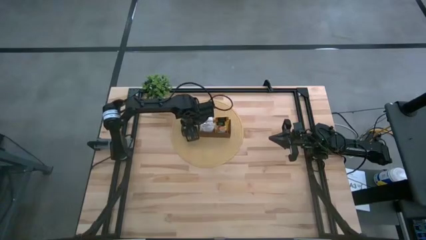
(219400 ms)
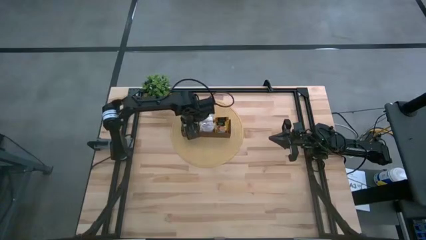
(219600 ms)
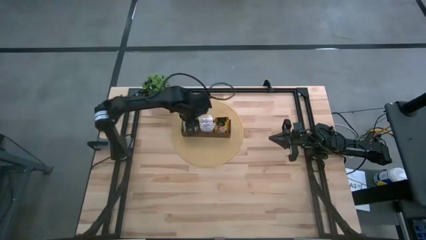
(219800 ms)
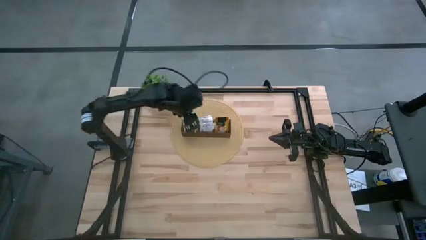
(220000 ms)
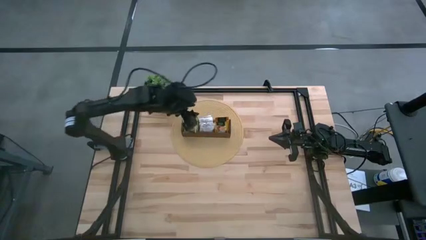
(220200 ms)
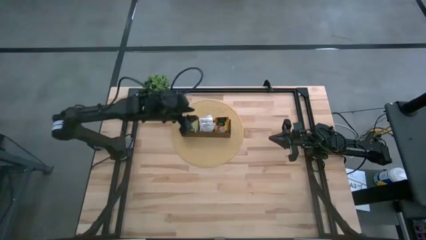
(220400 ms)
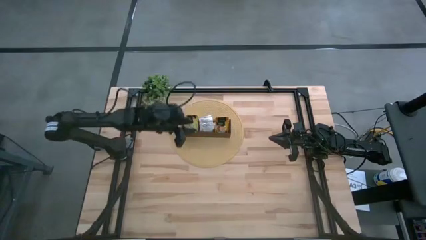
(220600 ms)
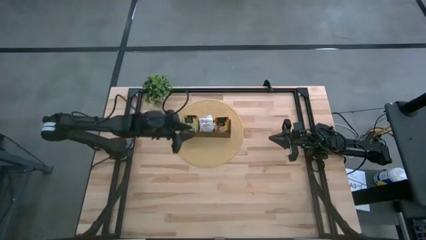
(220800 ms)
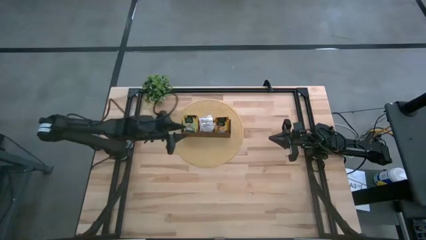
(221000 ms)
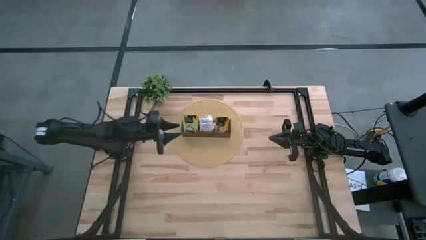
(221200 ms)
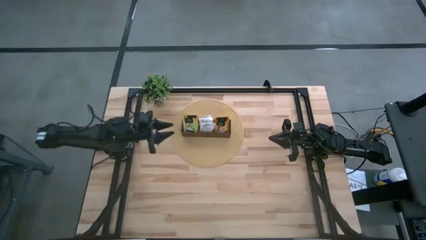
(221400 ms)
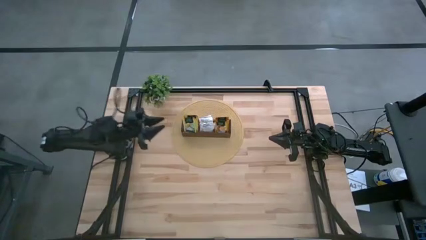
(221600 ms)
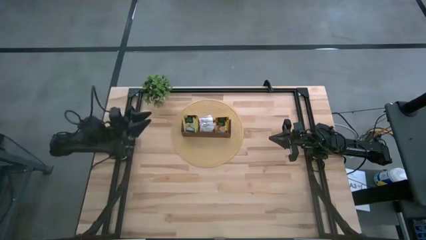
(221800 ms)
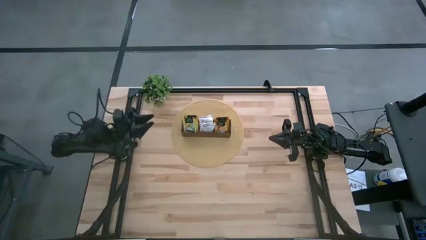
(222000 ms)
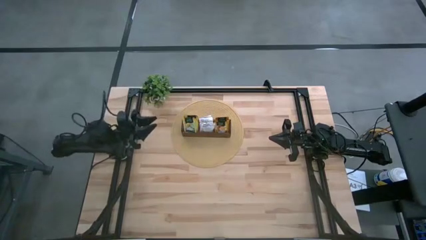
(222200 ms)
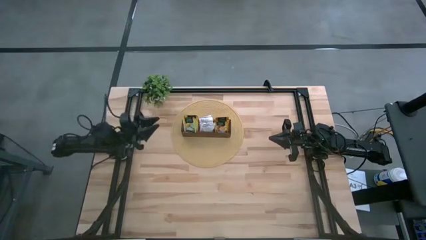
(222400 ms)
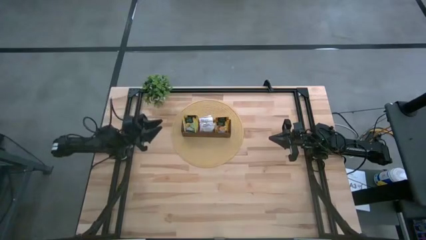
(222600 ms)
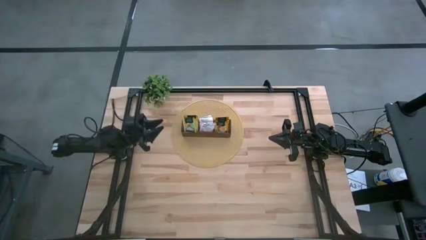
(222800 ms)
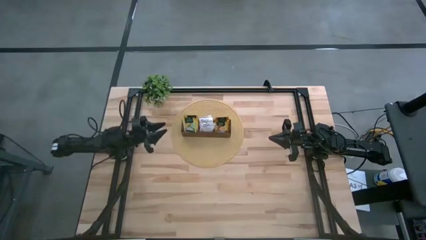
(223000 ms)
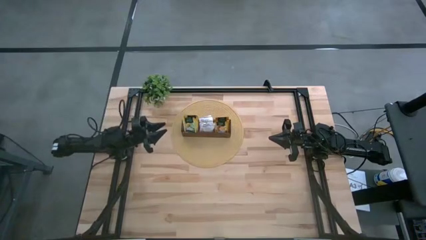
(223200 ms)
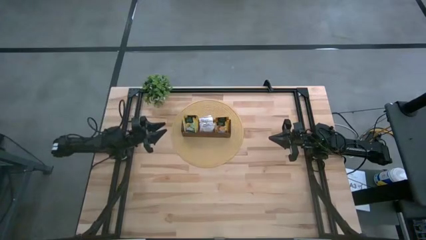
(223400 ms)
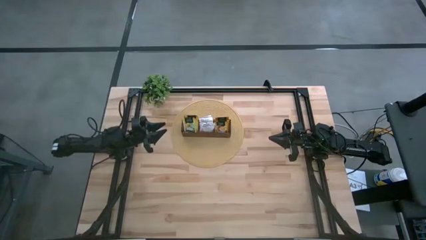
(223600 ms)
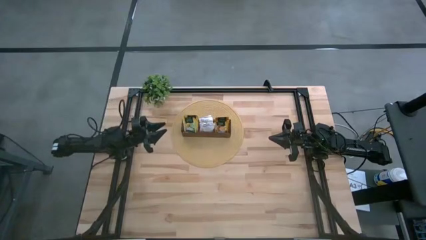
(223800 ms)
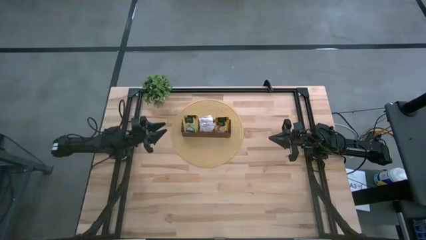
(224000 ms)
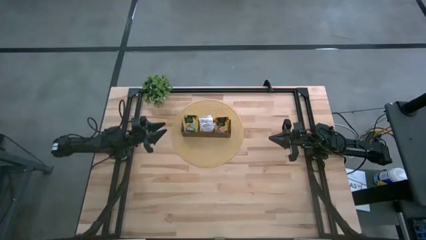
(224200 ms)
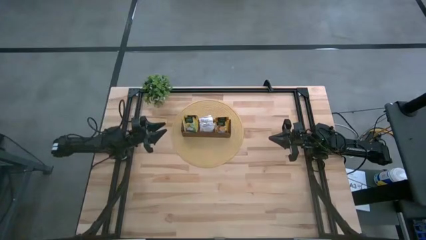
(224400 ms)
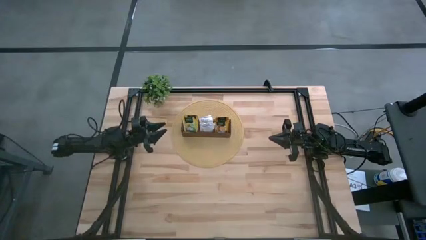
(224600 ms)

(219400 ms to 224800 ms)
Task: Pick & Place Tea
Return to Home Position

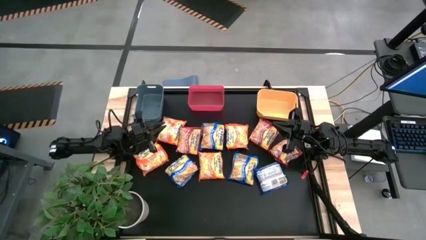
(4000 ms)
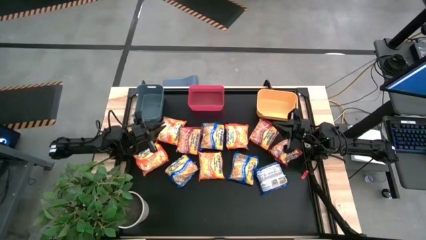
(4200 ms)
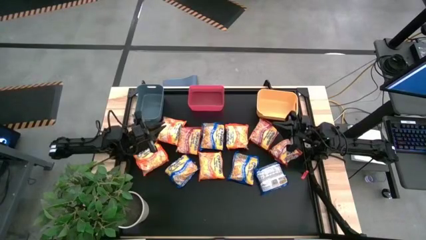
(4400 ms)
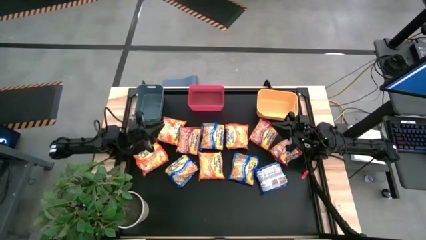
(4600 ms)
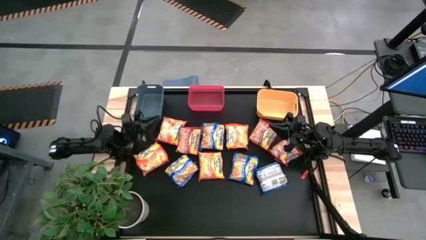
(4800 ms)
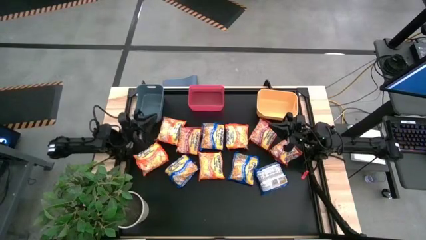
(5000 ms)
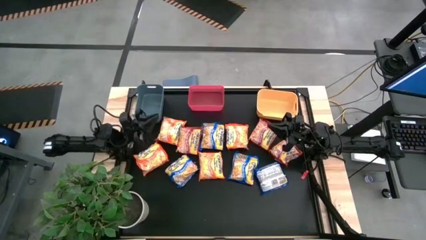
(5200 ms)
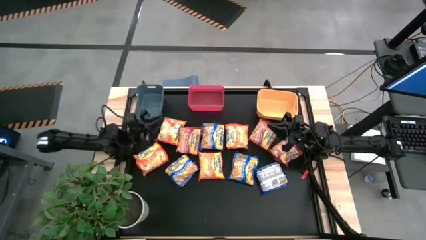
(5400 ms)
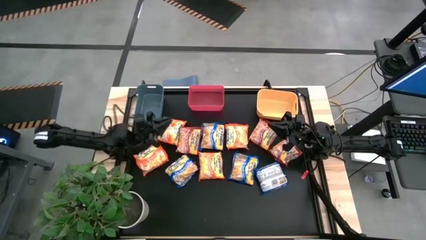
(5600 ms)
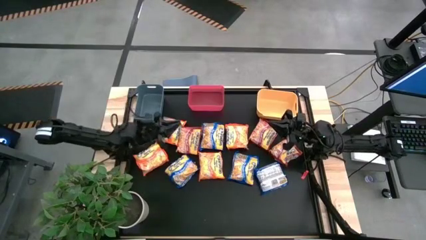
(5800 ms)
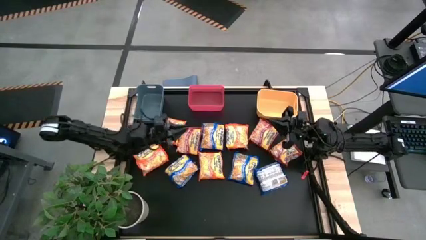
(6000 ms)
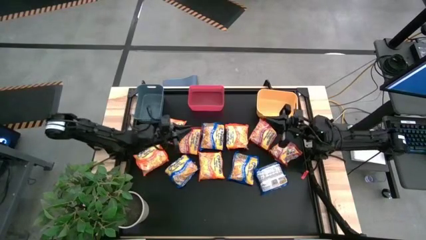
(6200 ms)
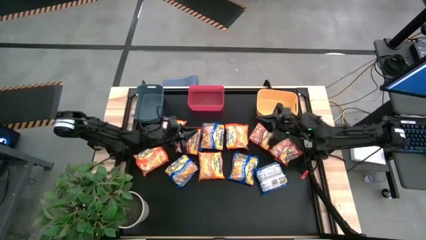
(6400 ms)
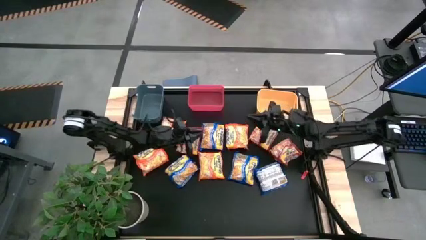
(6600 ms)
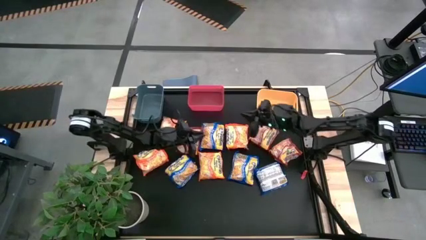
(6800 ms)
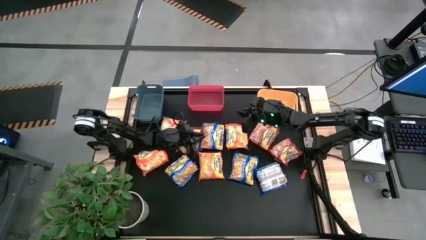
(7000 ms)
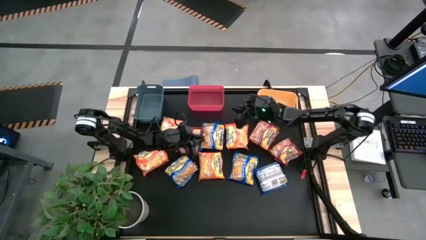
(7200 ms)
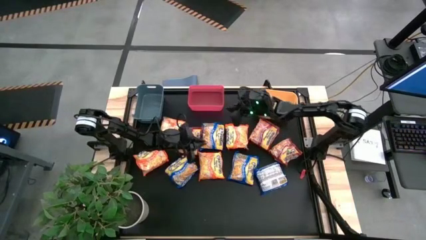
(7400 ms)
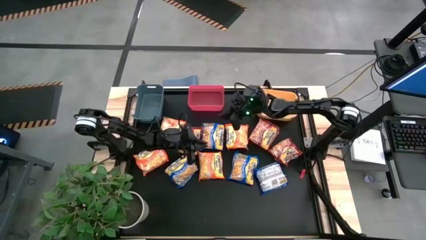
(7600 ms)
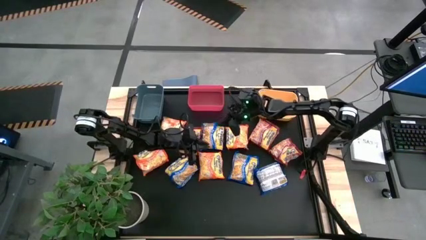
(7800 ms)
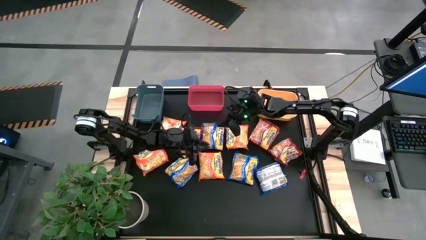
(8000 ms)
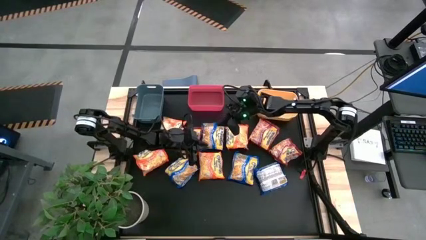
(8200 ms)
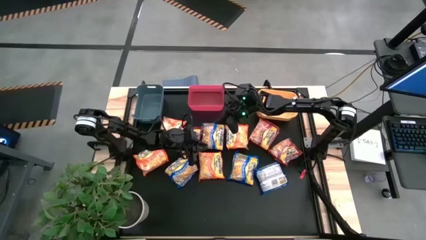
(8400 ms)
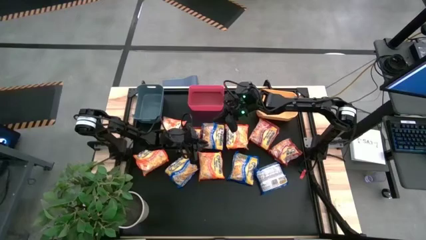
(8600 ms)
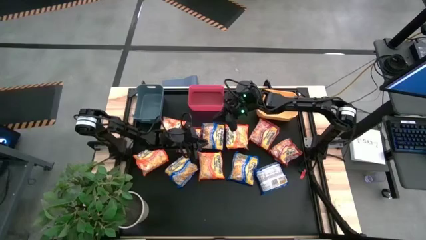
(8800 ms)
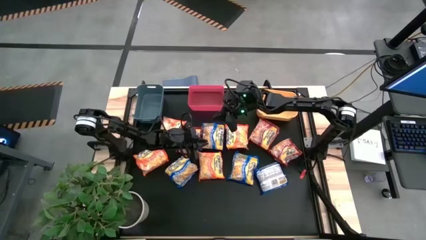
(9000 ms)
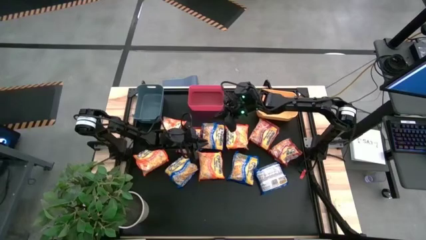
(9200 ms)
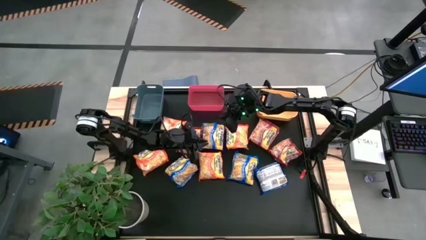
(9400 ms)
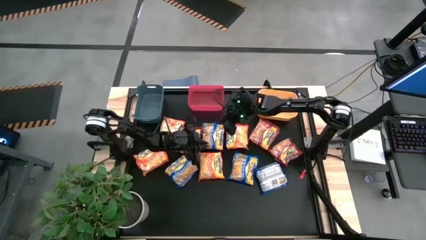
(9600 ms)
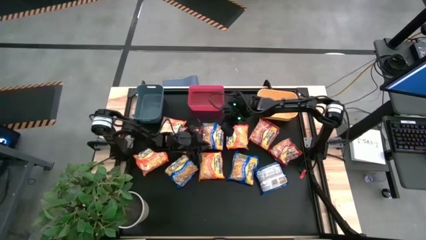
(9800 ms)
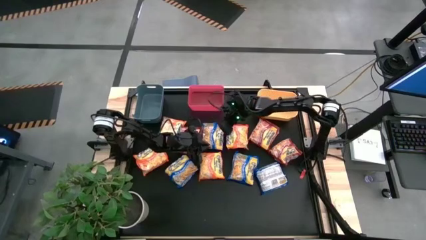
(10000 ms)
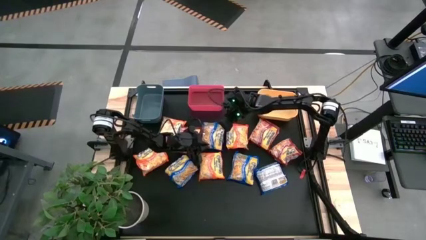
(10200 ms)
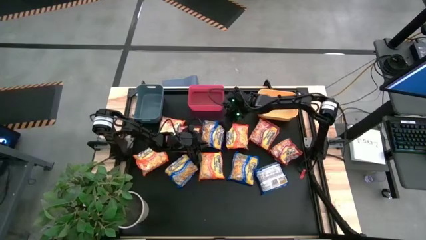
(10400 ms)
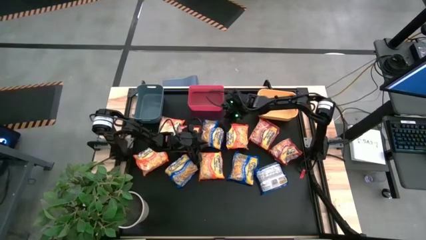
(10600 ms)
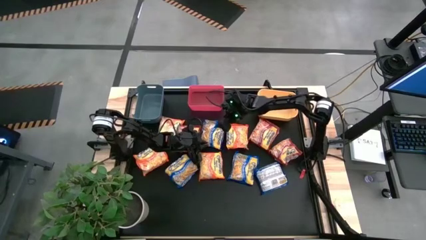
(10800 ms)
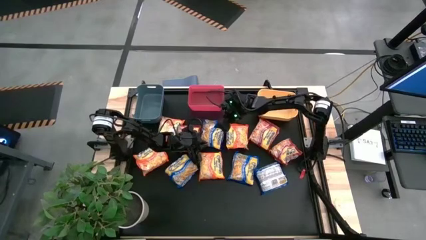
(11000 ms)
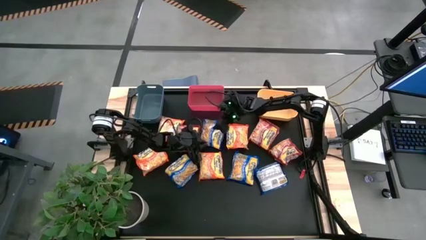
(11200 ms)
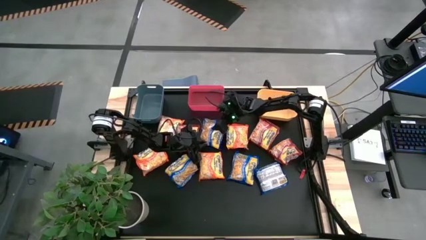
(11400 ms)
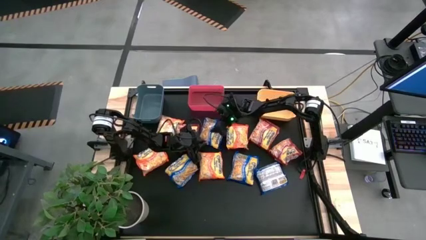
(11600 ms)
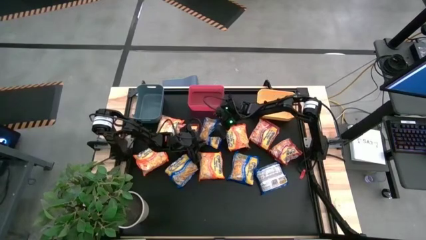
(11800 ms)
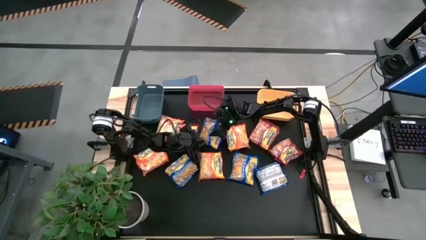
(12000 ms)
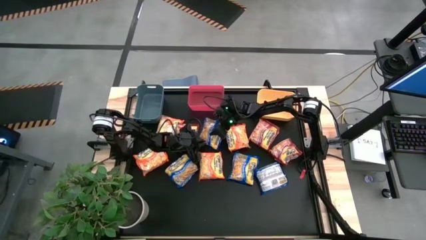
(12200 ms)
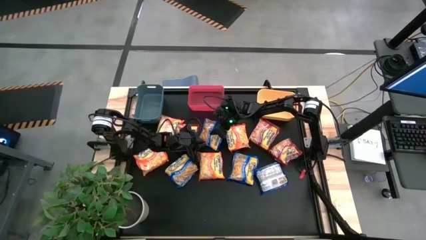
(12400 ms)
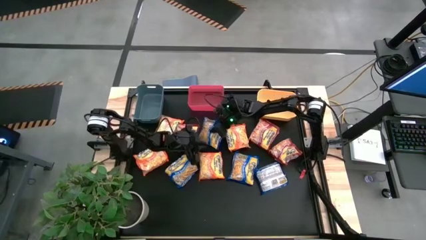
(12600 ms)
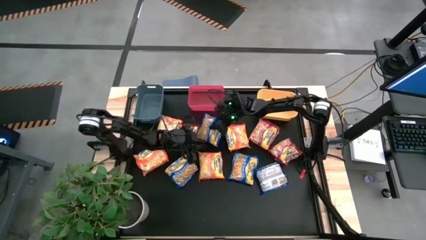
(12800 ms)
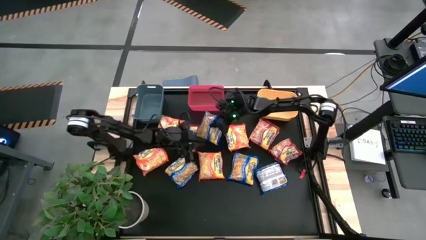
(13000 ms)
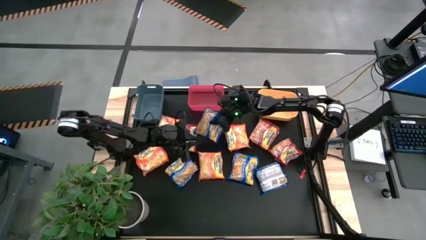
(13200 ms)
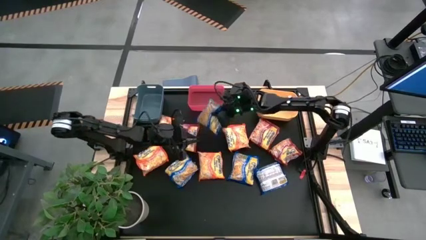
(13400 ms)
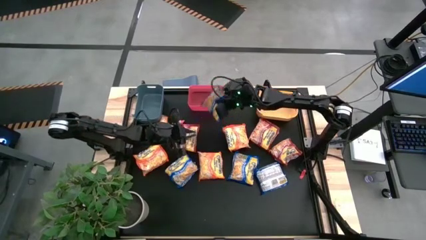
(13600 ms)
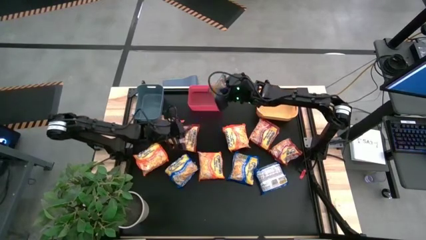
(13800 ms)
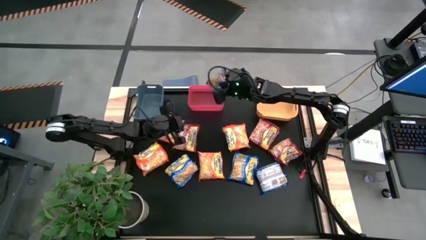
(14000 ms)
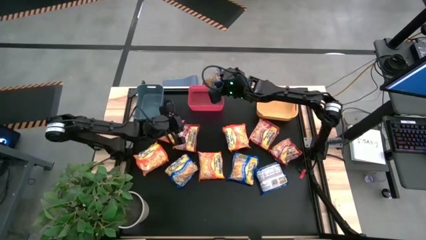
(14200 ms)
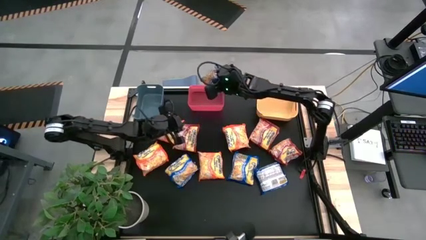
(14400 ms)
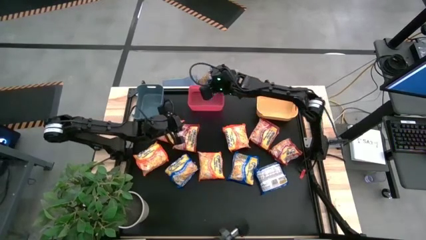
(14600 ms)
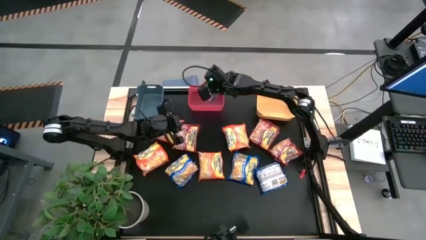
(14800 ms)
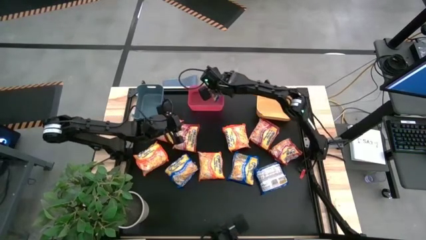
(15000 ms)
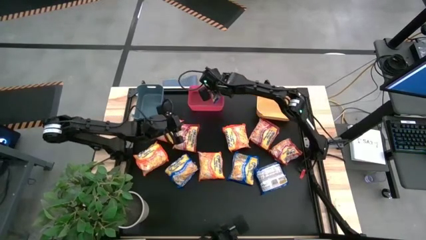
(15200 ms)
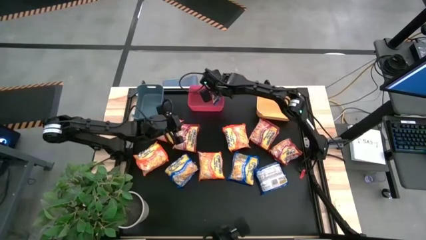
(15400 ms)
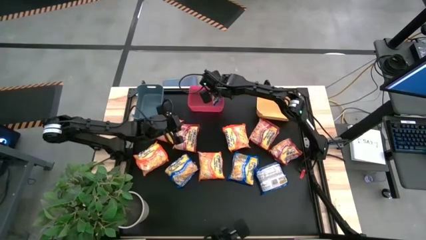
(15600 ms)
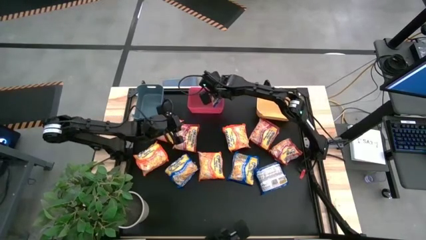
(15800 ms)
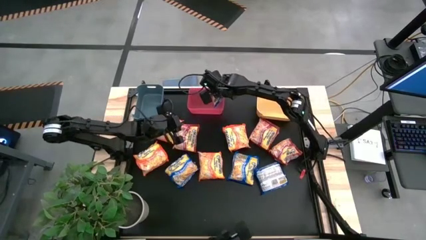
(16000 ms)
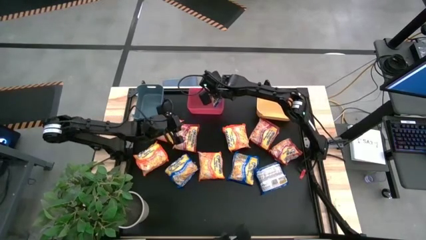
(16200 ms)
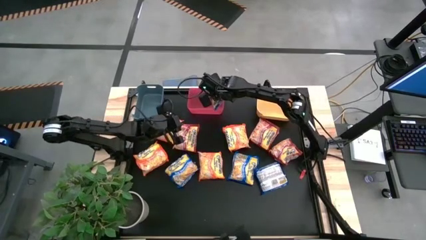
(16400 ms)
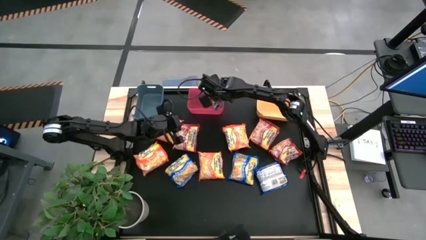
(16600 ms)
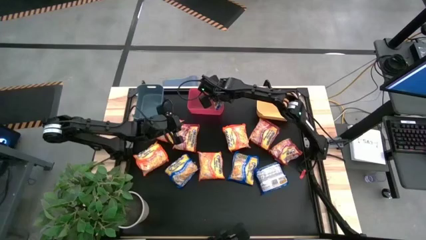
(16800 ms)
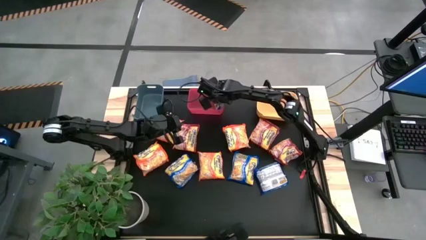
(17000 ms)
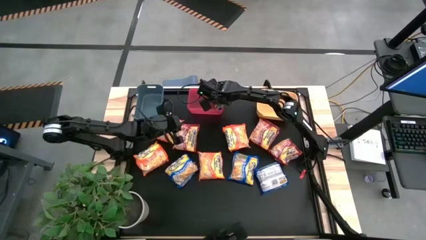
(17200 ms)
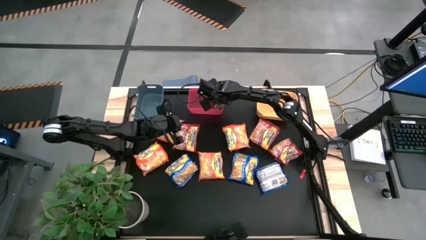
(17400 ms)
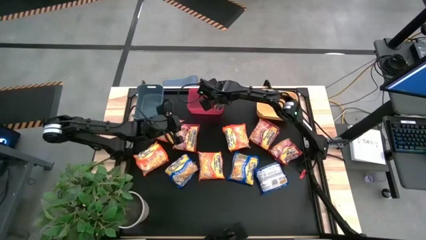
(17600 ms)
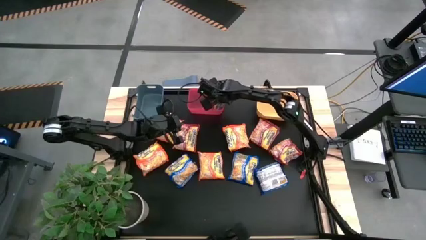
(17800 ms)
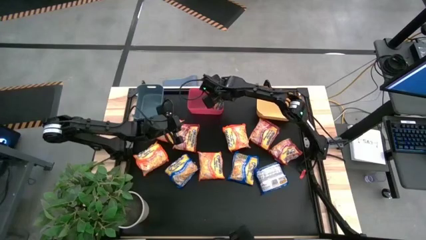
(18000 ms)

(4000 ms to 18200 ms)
Task: Sort Maruchan noodles
Put the blue noodle pack into the pink bin
